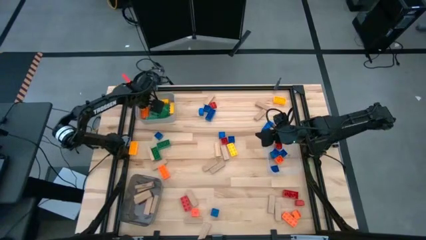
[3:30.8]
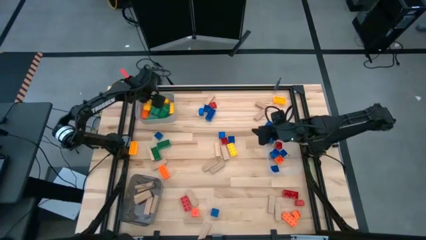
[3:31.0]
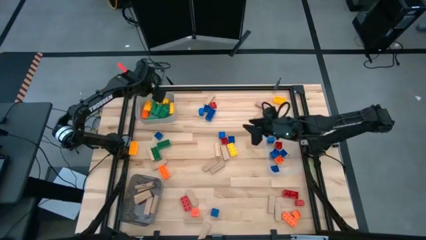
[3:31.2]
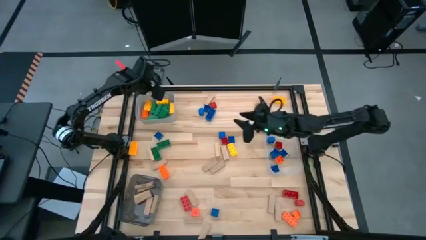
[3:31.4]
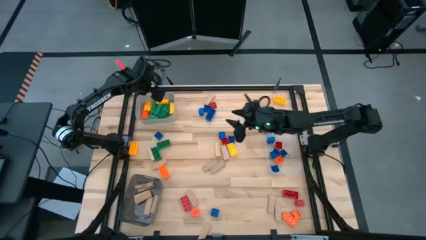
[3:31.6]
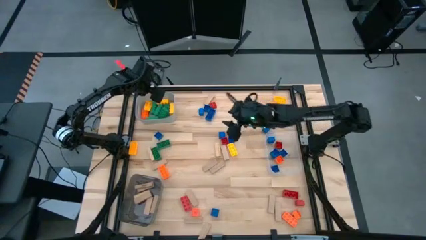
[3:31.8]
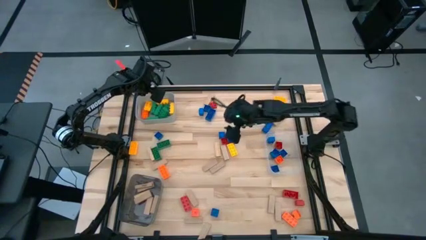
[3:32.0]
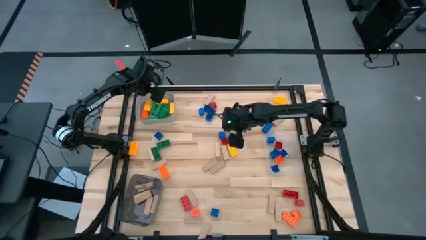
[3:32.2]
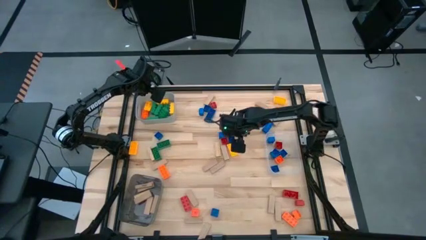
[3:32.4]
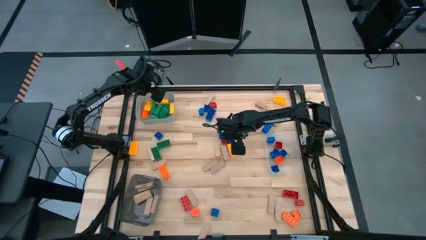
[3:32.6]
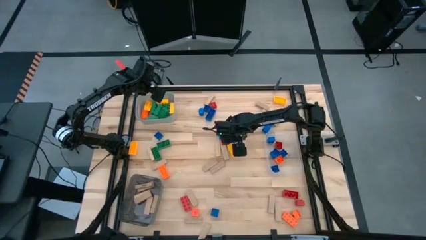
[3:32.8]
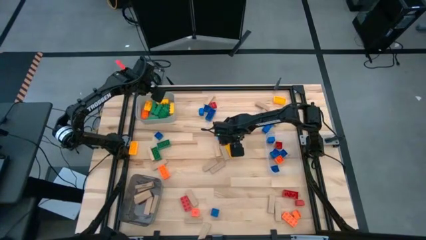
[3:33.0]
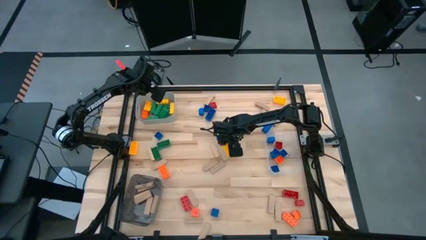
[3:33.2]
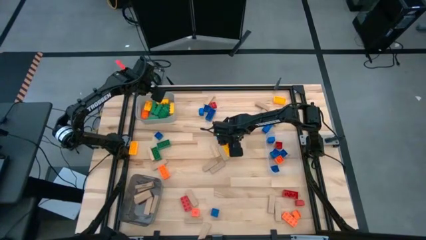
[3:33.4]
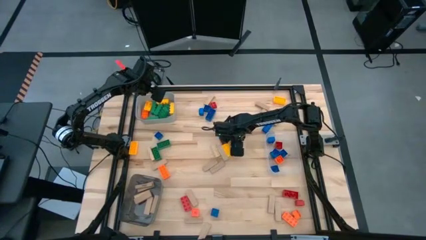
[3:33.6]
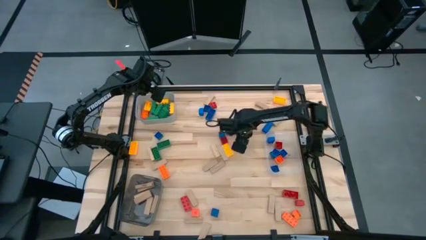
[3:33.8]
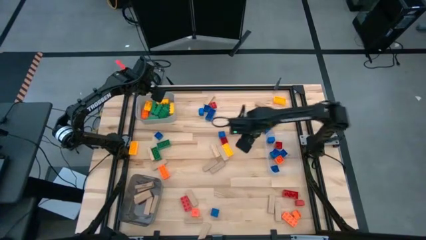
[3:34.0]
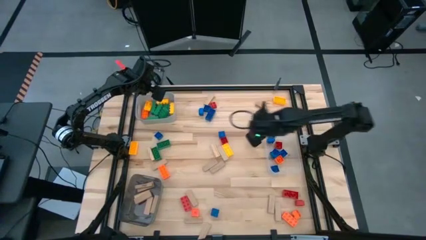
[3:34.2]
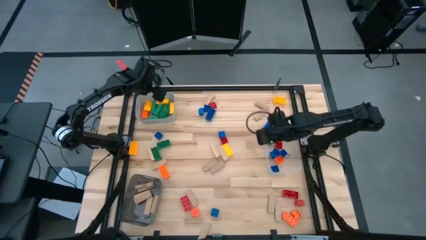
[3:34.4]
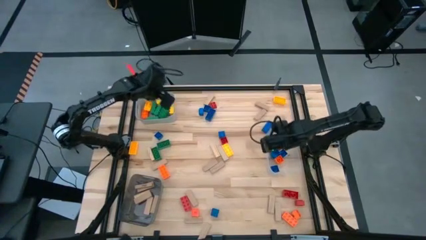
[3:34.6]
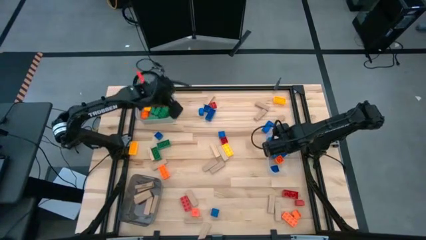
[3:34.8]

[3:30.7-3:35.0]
Task: Sort blocks by size
Put the small blue game piece into the transparent bin

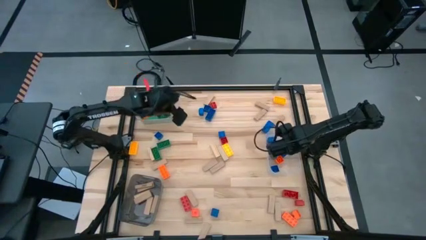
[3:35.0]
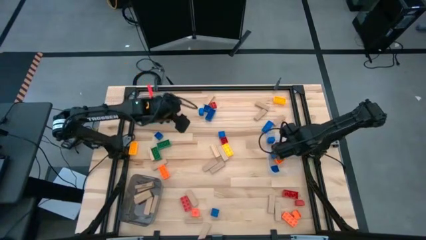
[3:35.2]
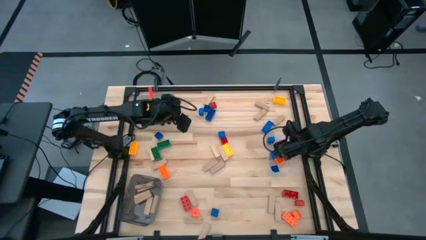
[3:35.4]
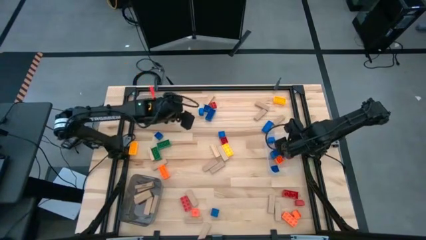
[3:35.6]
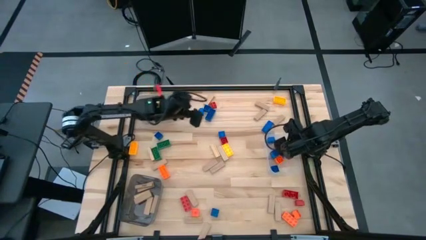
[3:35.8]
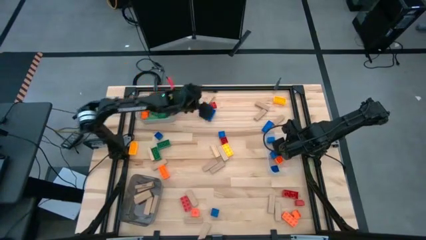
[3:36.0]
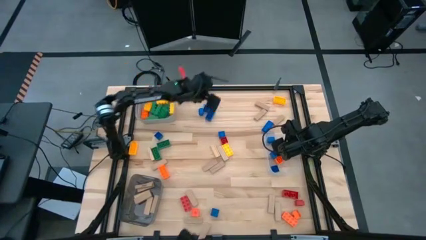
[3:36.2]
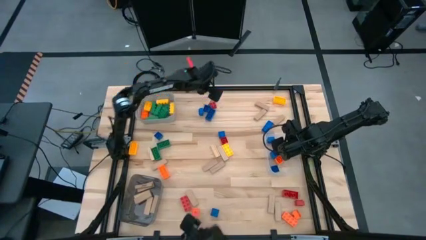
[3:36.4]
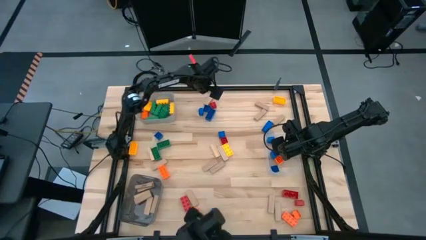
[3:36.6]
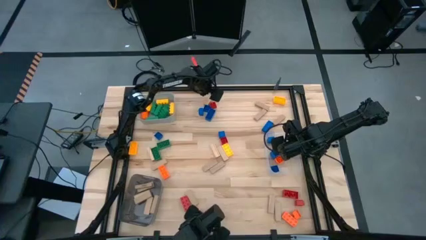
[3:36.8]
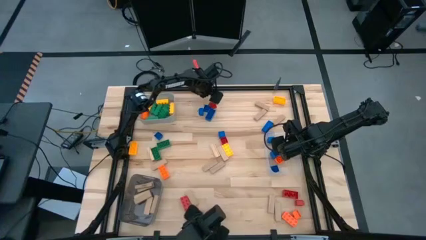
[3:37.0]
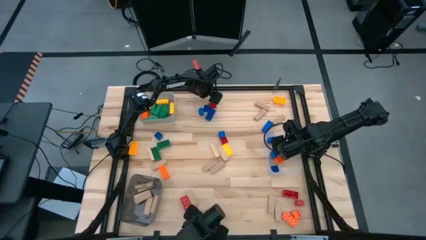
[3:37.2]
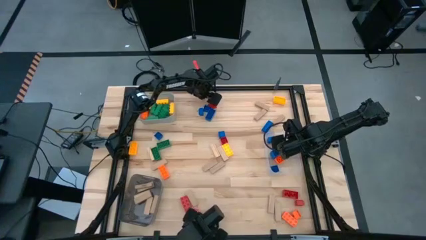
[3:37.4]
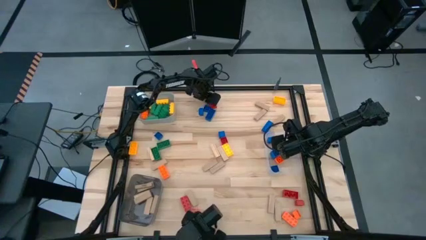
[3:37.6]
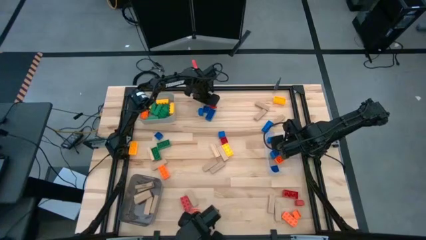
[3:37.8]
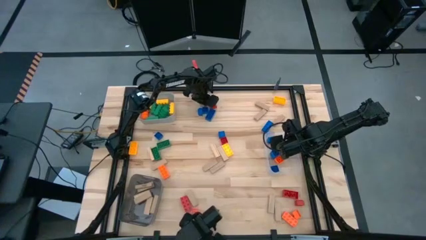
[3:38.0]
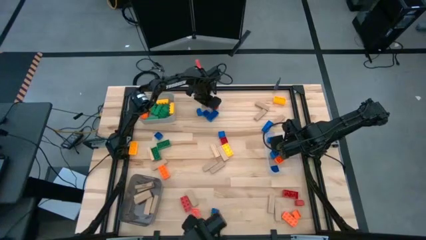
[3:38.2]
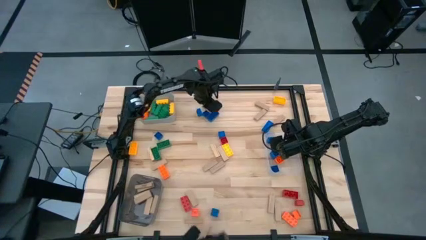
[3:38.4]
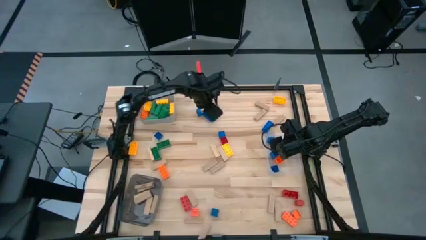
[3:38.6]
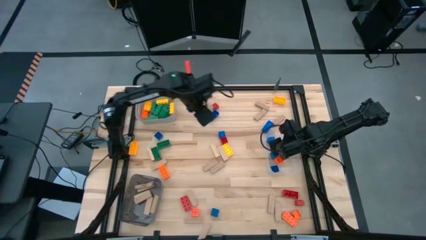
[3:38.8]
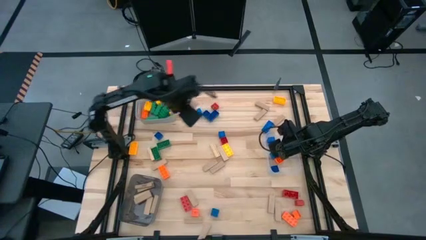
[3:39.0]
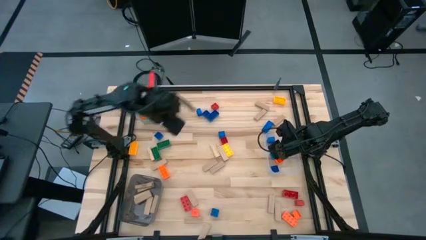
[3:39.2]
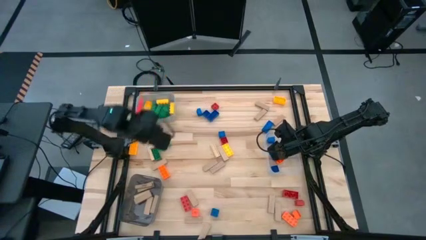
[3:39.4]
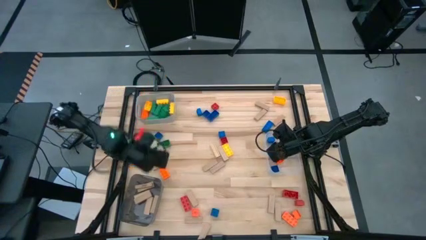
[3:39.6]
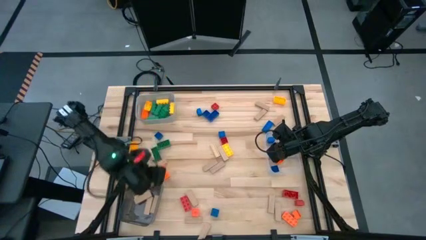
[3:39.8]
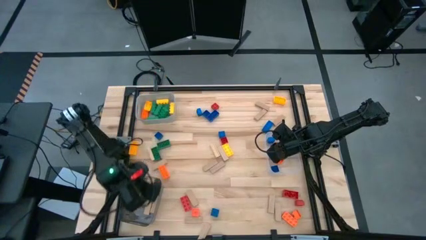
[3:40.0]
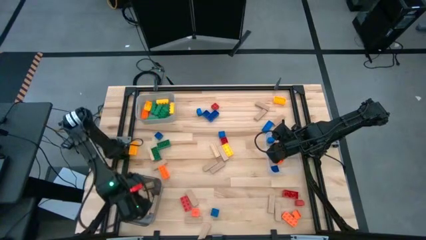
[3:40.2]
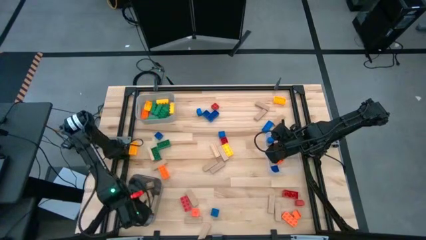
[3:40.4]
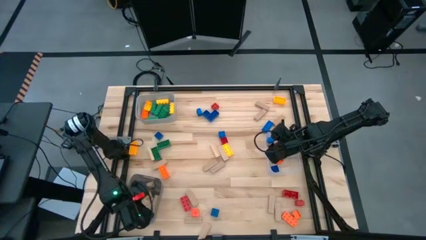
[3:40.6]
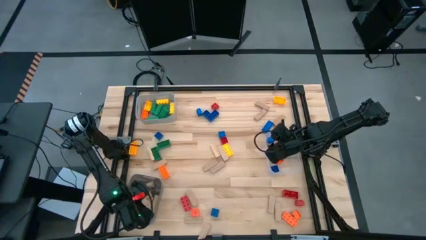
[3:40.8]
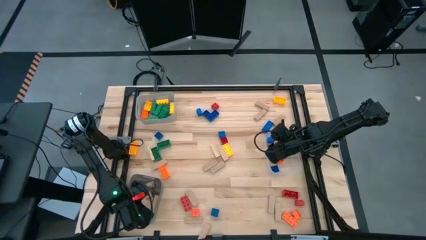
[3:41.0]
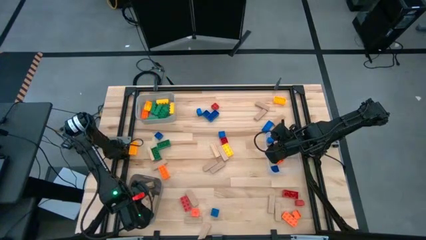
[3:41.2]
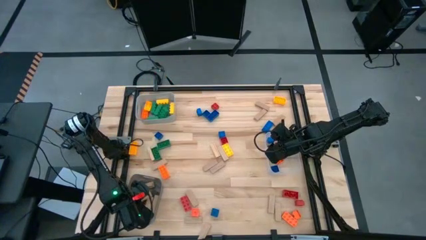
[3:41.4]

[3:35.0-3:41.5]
Put the brown block into the black bin

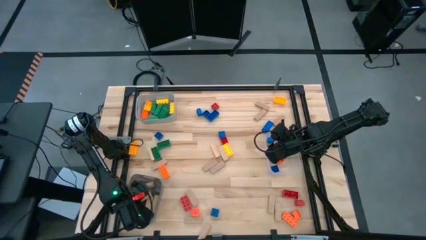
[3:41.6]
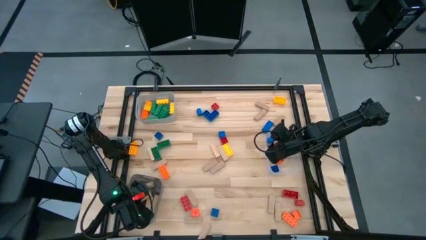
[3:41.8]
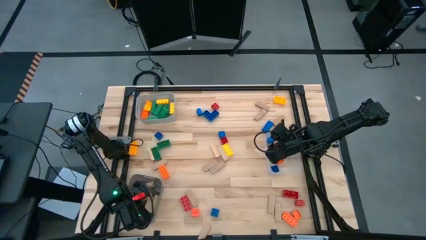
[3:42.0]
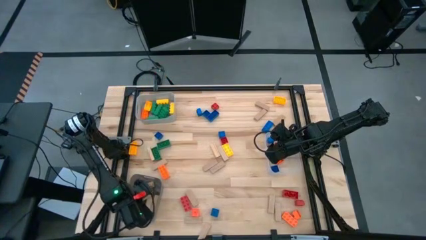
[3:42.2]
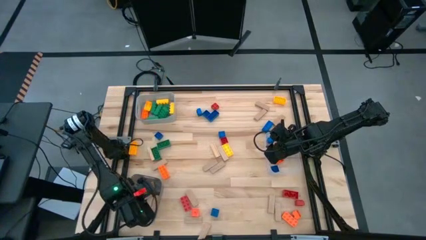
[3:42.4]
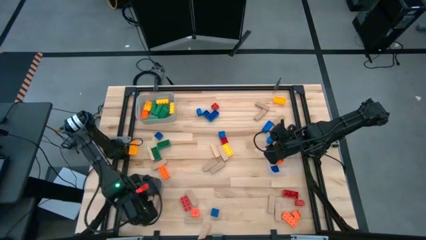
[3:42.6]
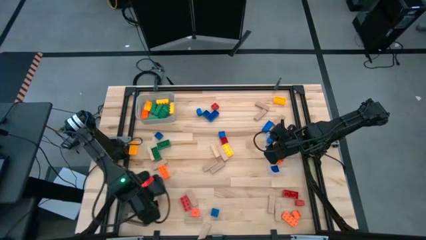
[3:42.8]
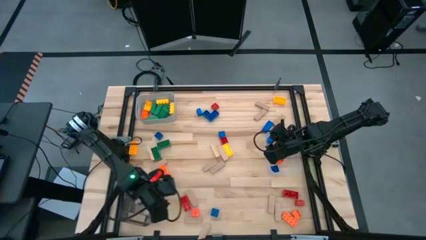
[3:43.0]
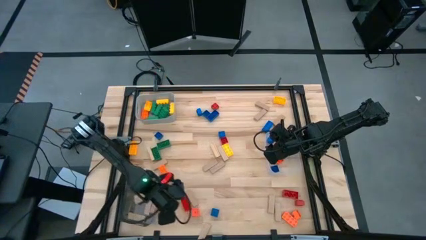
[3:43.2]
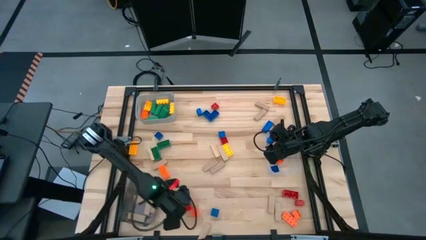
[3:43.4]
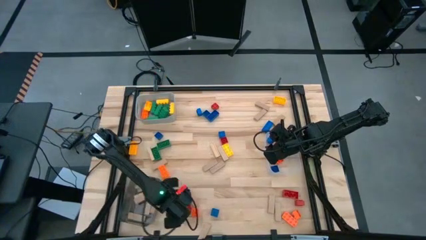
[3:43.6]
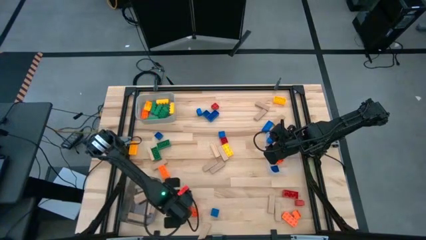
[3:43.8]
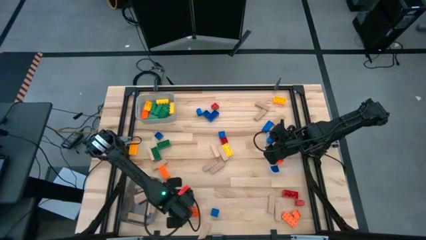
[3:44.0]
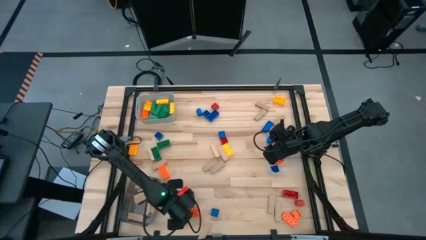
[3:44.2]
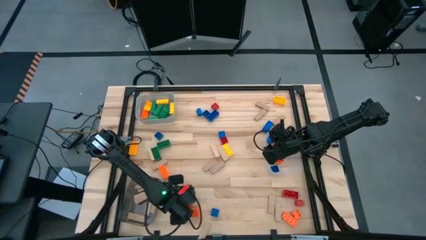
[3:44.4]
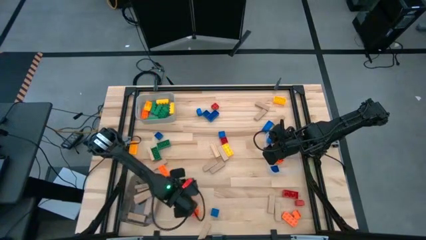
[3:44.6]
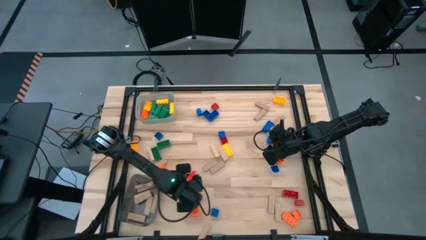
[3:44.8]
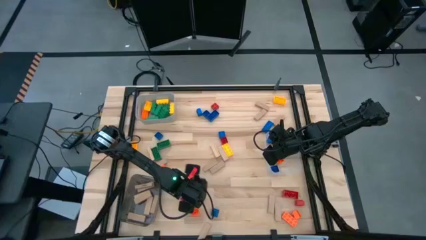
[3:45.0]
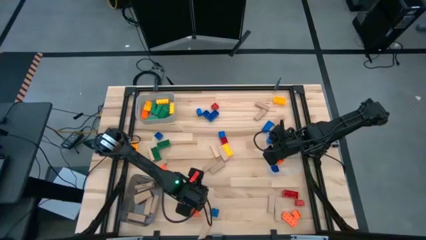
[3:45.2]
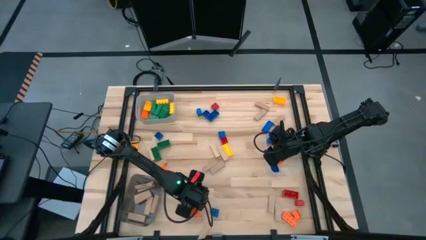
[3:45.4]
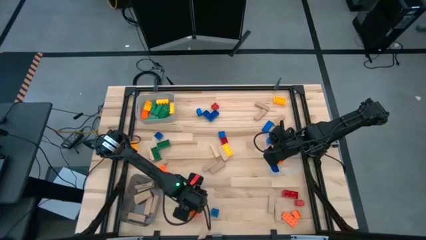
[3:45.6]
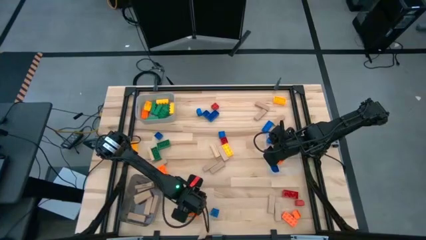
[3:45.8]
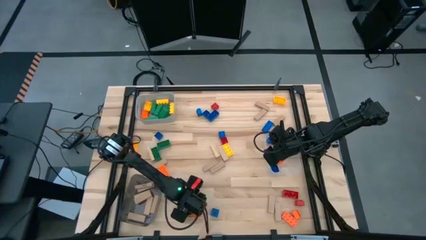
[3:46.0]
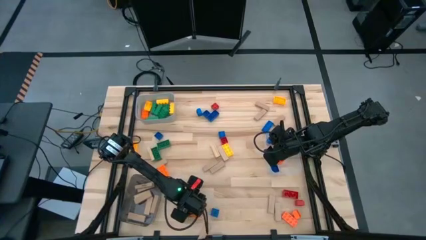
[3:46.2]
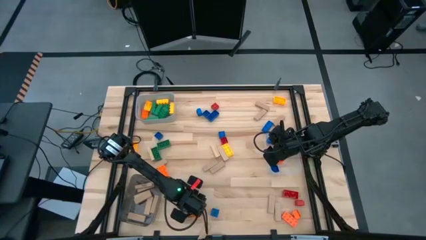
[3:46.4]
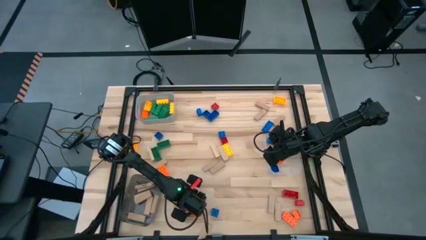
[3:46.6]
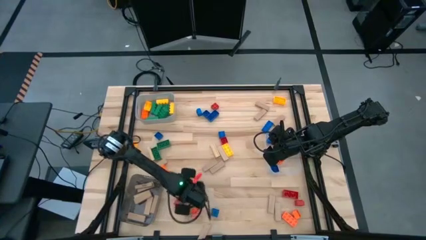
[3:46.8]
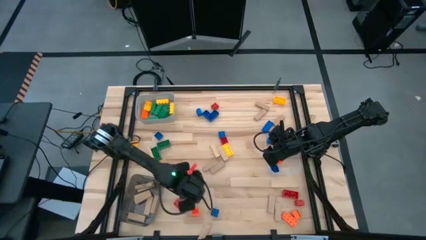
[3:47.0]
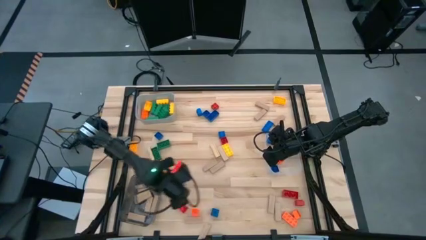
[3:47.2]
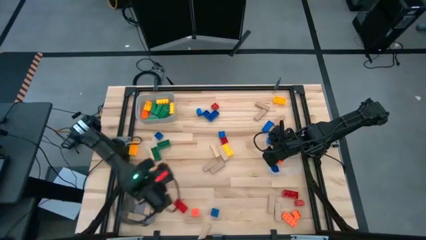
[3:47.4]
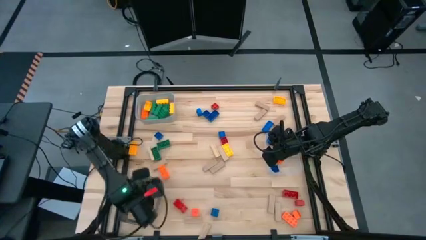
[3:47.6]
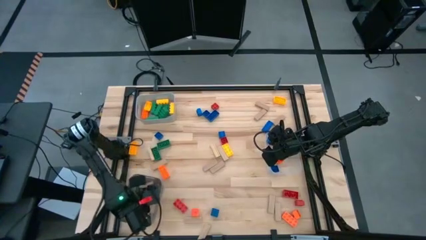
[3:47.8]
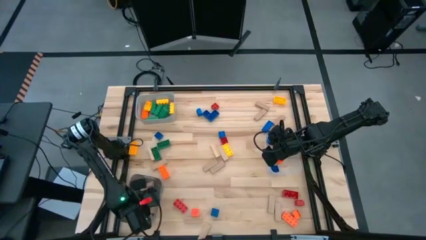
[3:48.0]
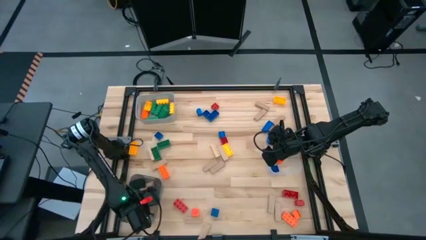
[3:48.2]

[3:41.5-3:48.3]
Put the brown block into the black bin
